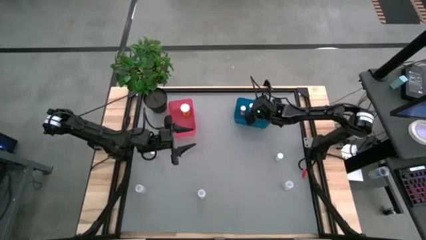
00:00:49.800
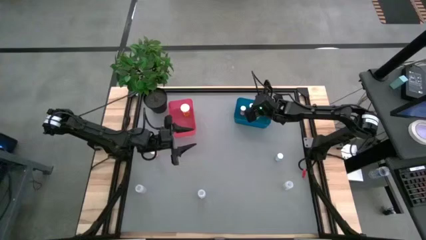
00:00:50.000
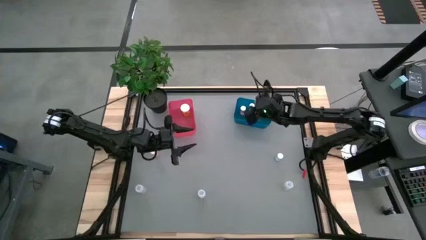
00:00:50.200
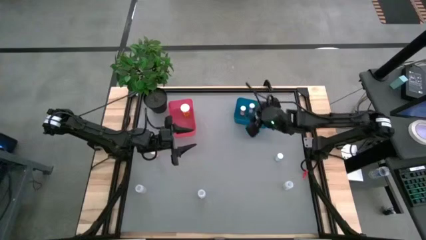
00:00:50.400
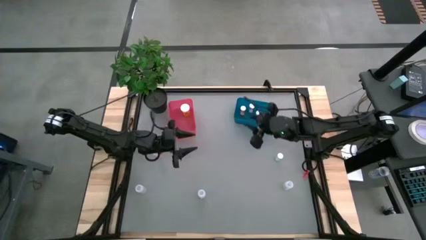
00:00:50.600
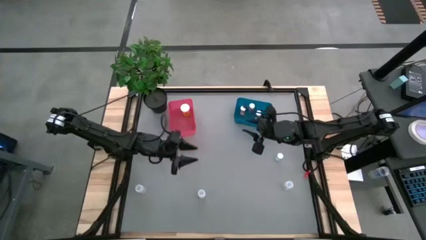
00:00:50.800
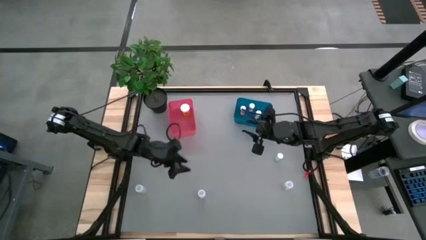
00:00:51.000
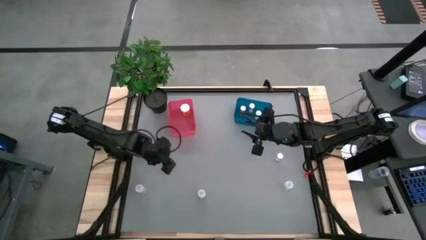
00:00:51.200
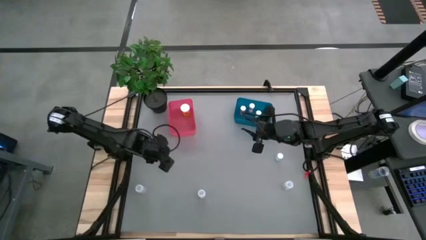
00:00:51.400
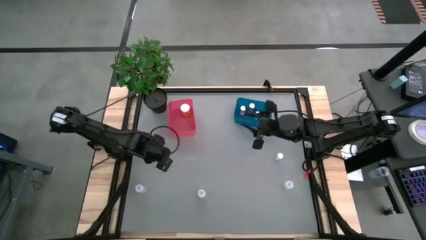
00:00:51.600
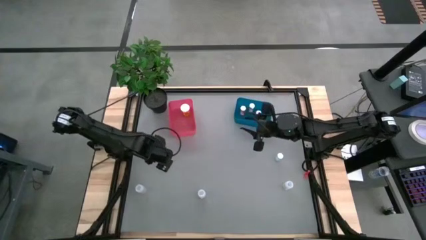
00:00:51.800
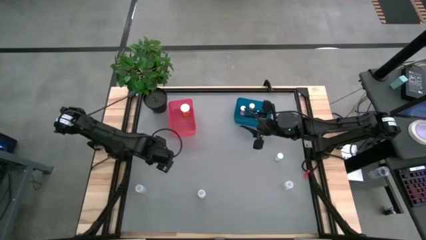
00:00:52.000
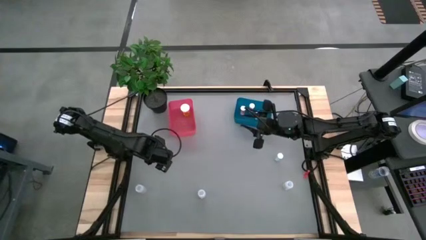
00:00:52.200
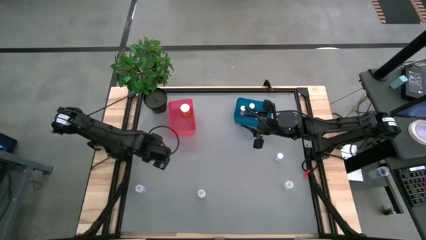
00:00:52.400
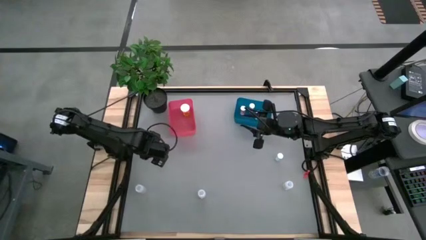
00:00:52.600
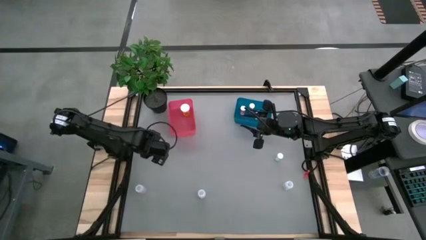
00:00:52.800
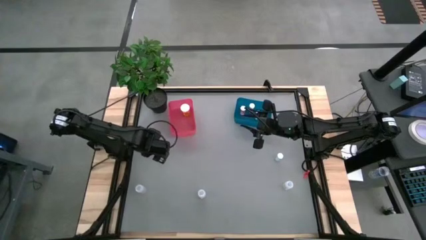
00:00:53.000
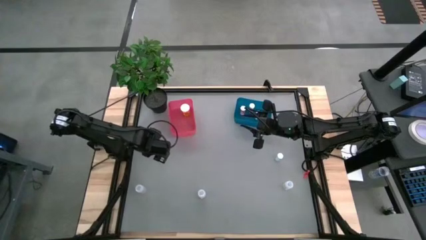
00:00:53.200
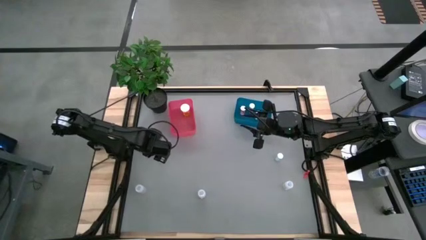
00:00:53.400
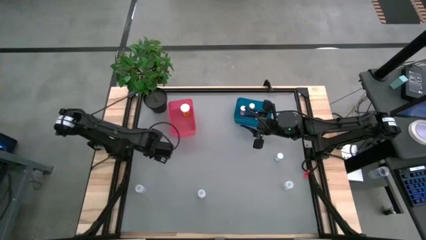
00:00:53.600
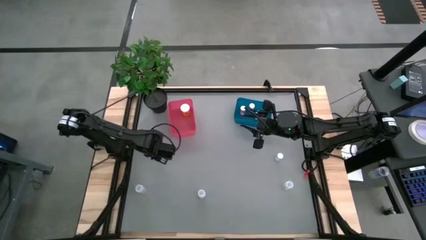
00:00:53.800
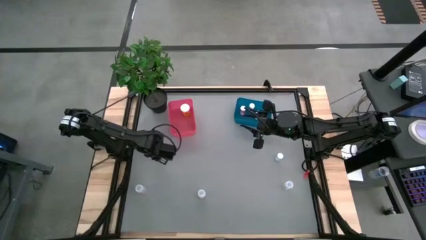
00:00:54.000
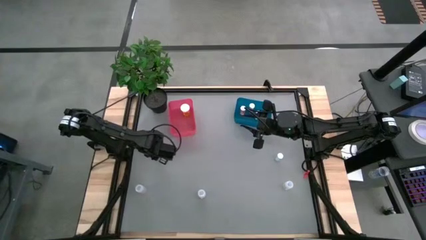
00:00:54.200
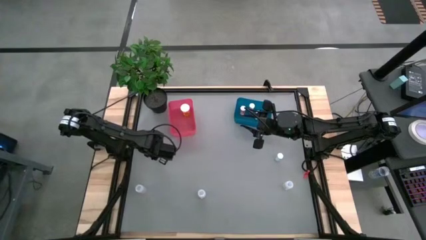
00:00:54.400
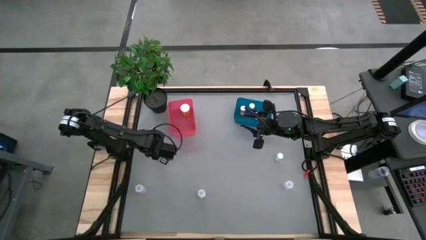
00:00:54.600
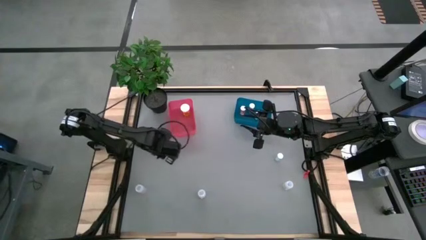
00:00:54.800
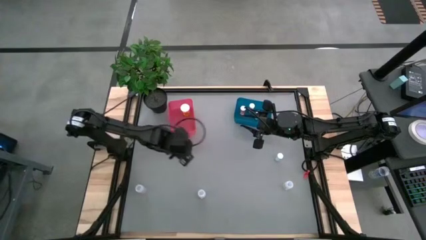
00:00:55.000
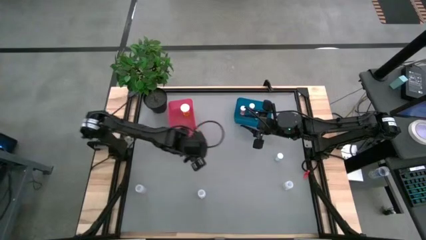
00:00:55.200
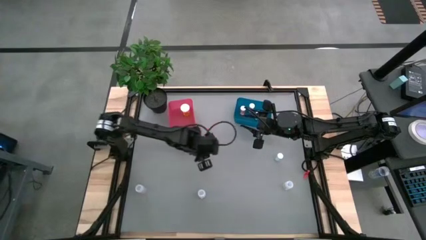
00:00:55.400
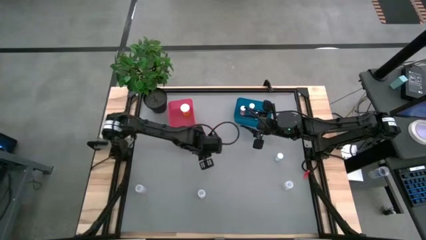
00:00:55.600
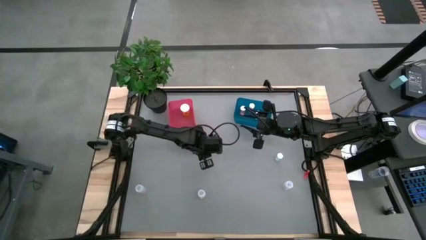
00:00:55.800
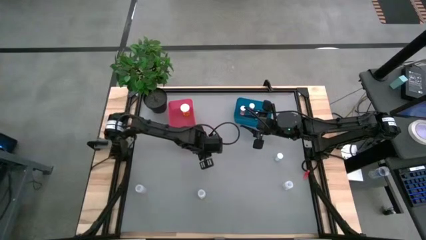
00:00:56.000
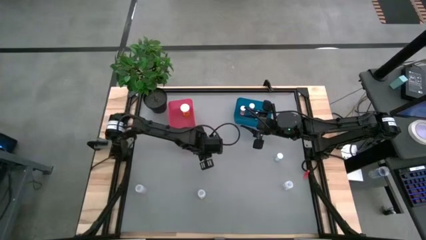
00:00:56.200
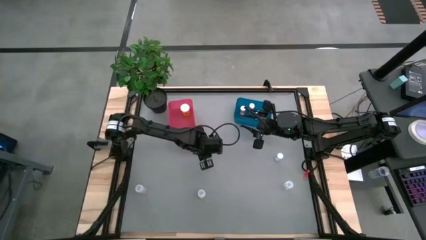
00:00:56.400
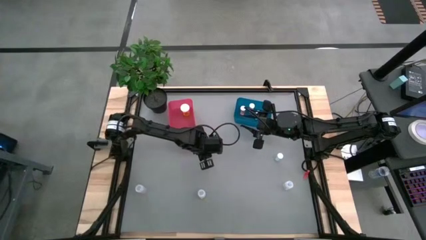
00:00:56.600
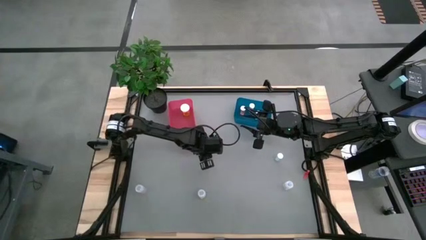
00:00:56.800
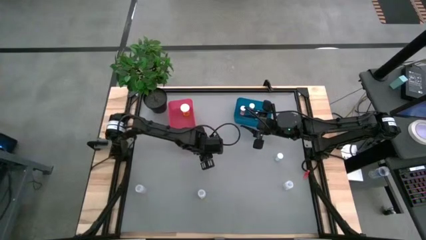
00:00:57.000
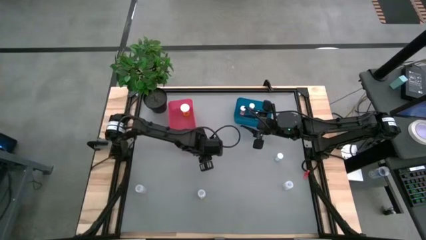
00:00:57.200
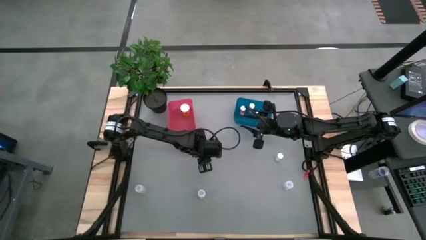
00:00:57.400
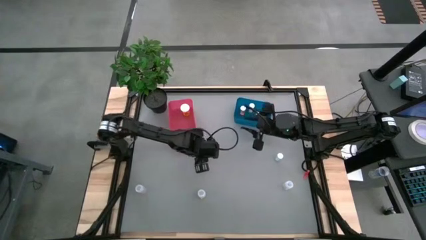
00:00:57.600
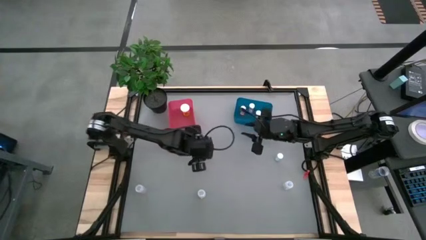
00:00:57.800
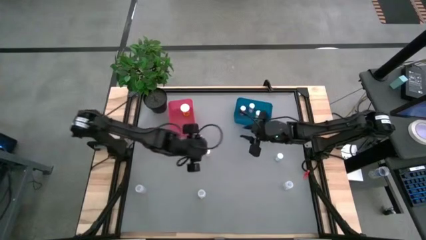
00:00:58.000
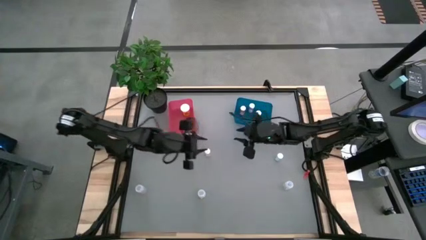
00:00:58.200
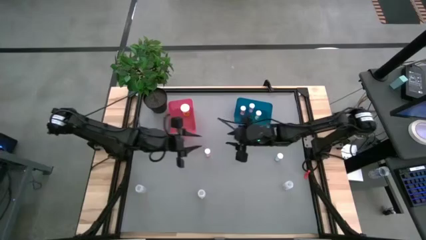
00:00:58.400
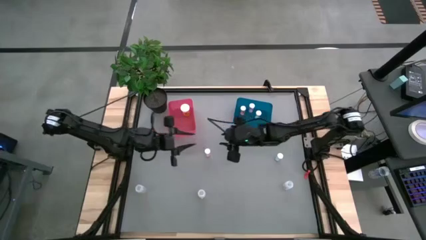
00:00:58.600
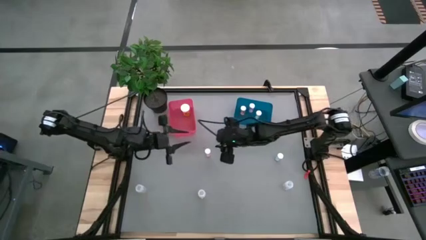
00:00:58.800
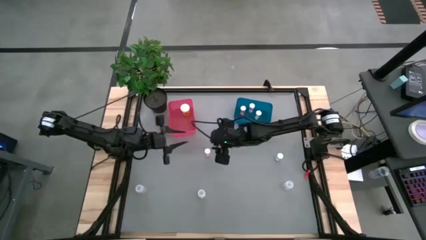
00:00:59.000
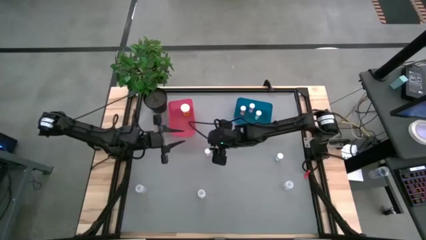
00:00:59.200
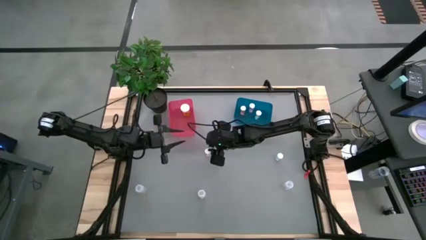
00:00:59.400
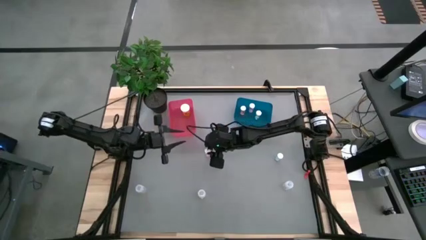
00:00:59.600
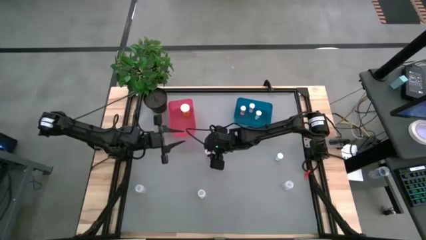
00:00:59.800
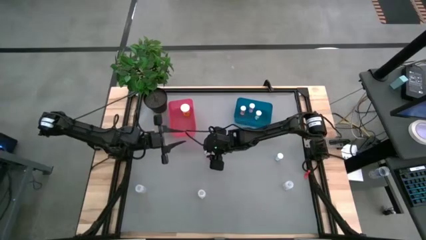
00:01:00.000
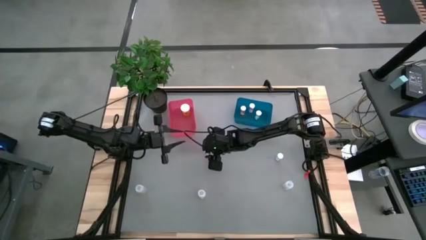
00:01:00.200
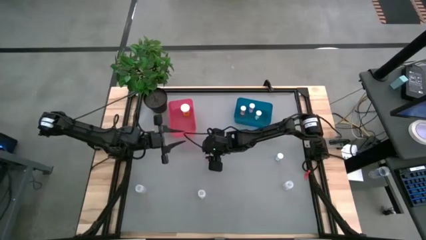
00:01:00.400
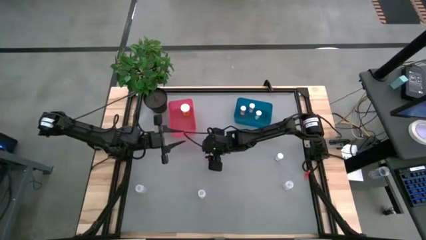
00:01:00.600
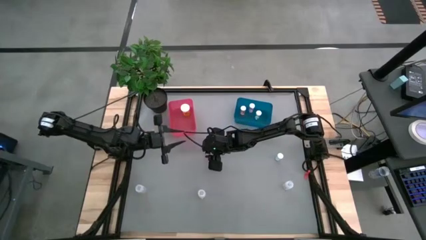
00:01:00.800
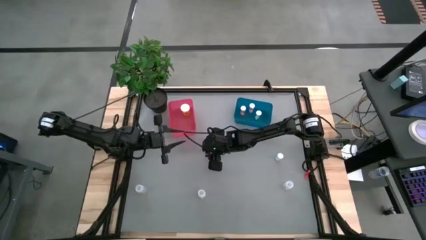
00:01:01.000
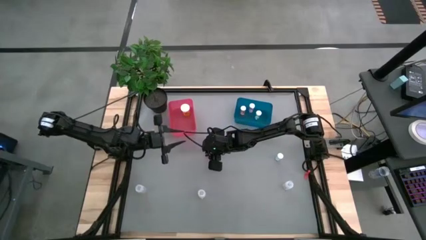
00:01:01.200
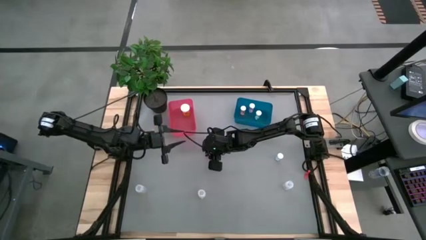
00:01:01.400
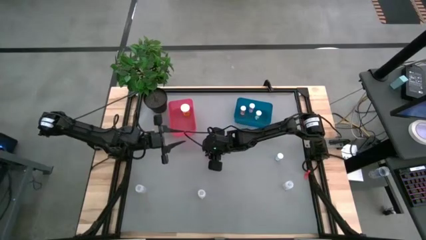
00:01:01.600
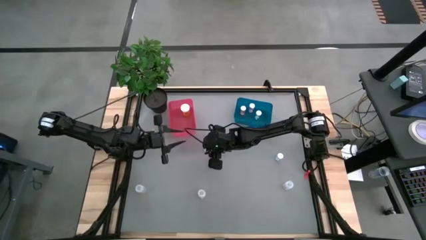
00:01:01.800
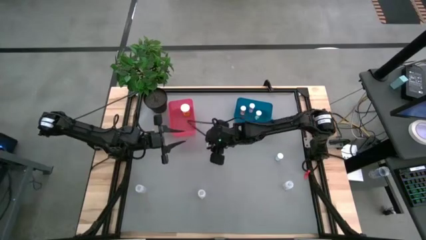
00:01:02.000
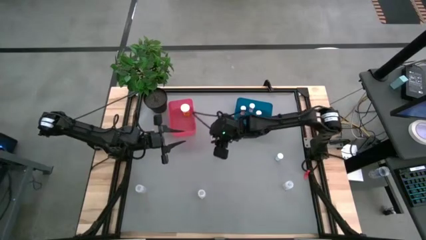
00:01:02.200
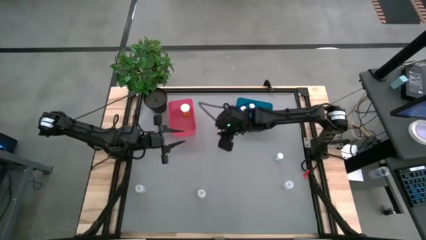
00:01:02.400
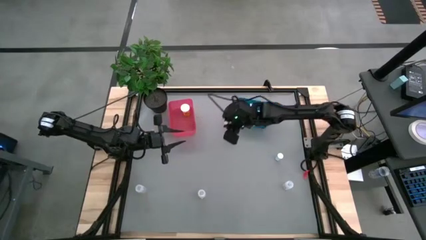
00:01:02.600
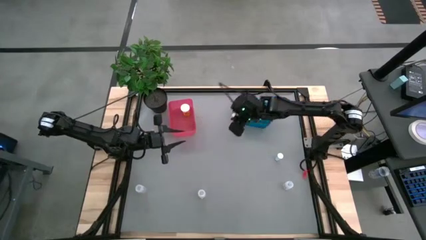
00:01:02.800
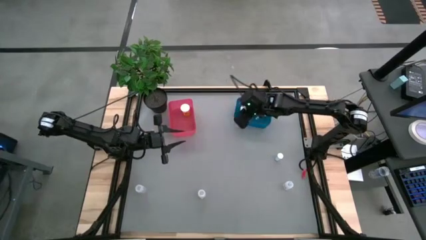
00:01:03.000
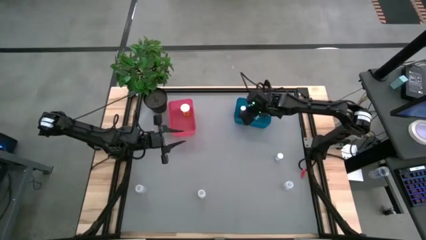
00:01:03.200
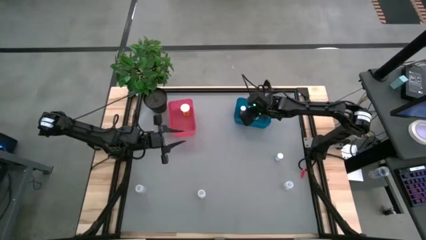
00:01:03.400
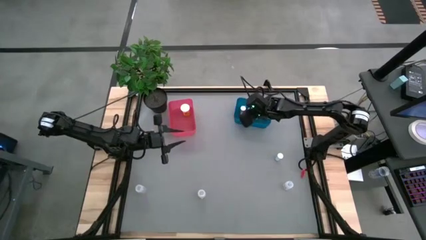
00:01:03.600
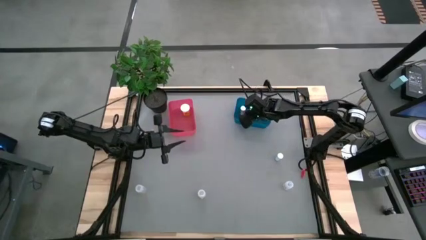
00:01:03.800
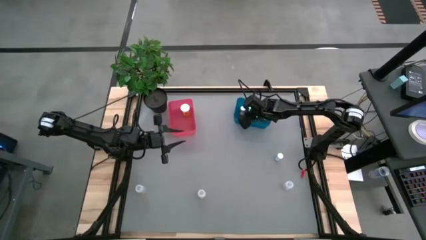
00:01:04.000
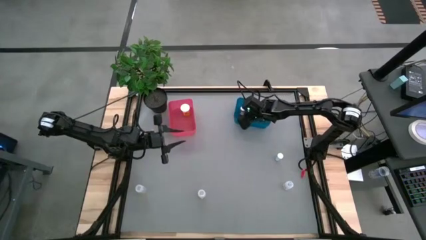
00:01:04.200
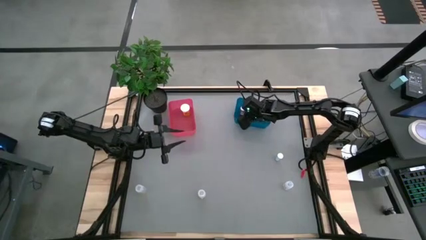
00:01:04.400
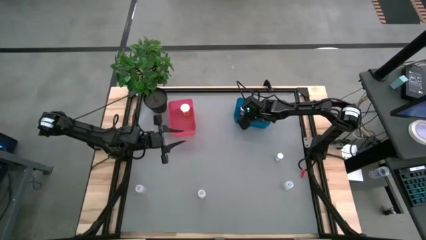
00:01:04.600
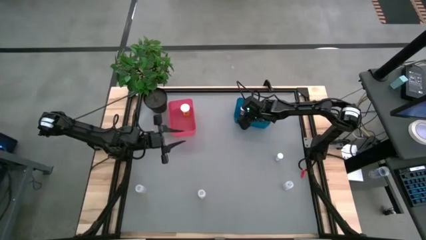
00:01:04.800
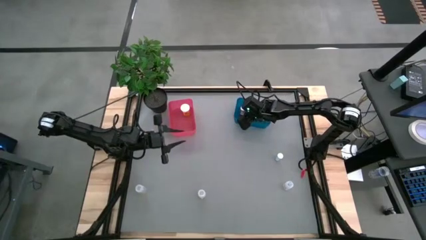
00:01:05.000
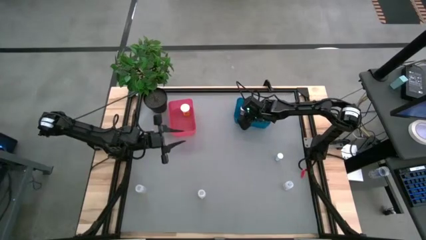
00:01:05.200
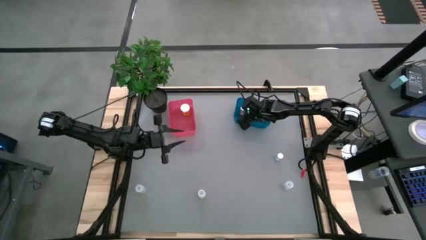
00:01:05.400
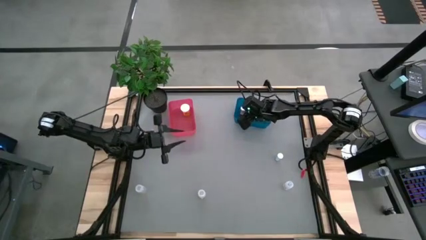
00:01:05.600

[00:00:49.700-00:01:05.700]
Task: Pick and place medicine bottles into bin by pill shape (circle, oval)
Put the purple tablet bottle into the blue bin

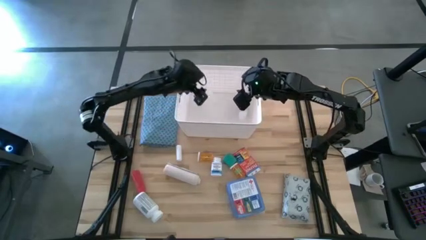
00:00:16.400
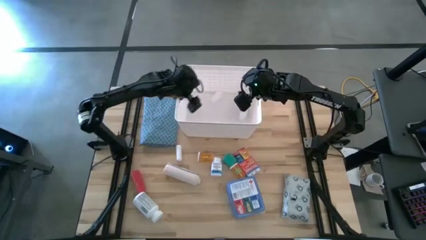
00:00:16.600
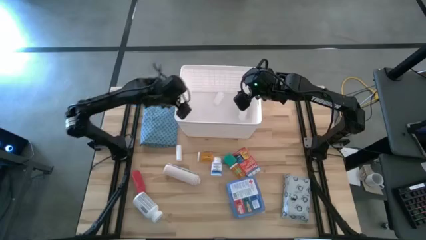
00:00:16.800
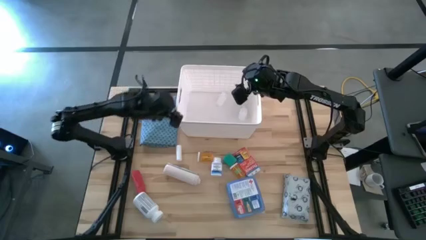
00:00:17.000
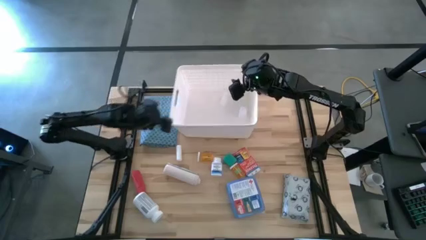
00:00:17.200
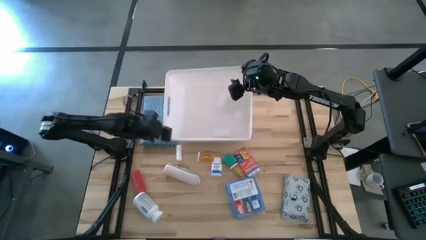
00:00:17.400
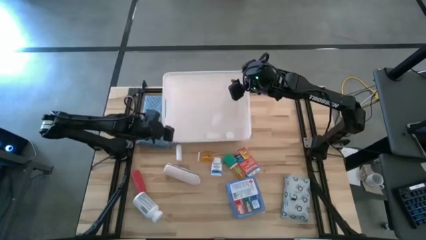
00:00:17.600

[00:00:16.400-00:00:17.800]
Task: Pick & place medical supplies in basket/bin
Put the white rolled gauze into the white bin

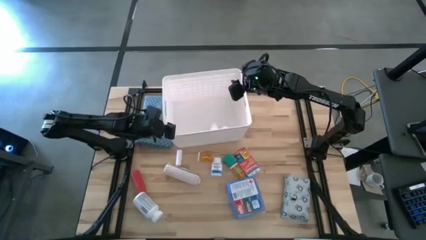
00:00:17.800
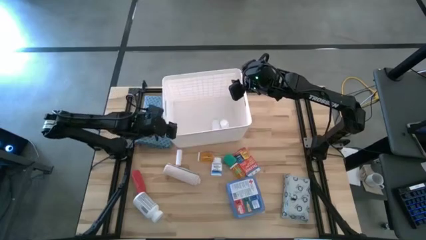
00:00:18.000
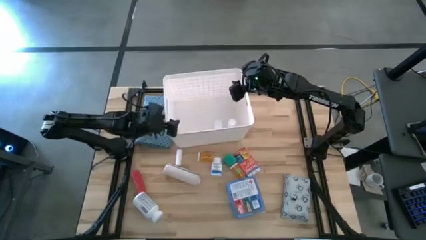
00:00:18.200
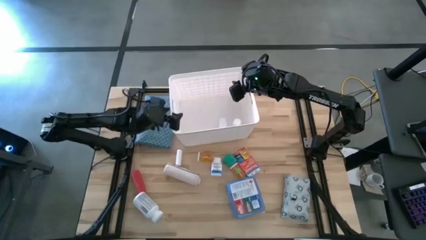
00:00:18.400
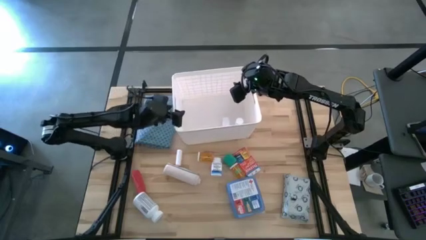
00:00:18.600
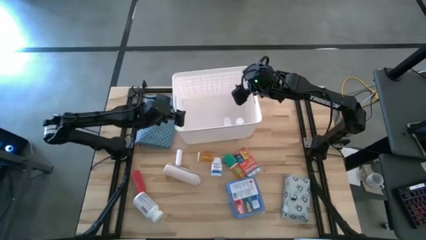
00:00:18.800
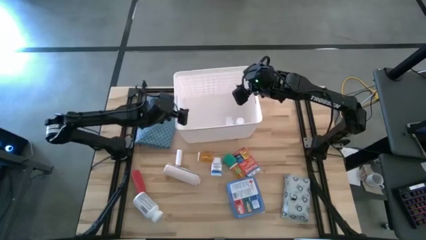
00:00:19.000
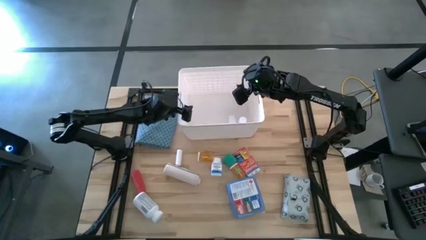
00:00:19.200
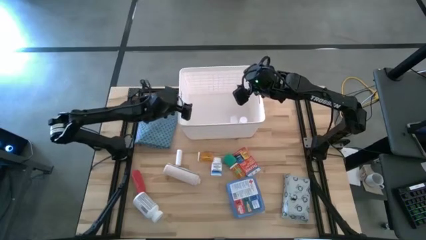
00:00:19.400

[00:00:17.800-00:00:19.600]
Adjust the white bin
